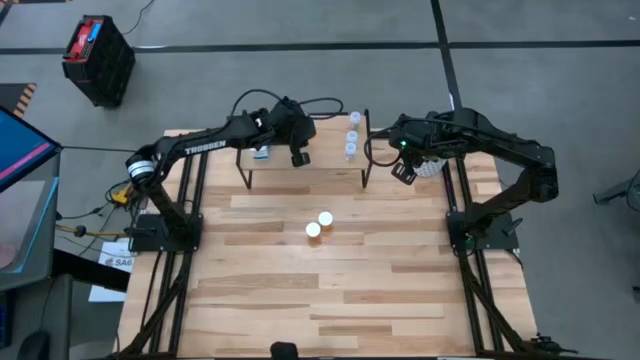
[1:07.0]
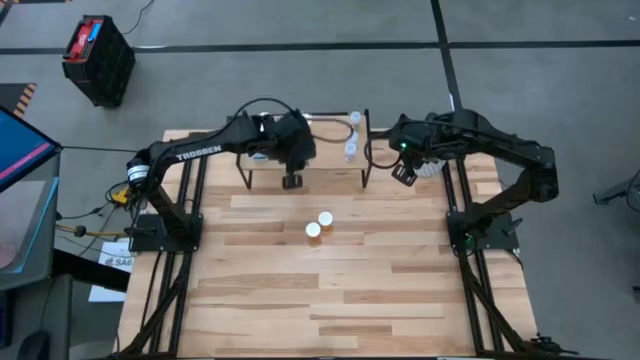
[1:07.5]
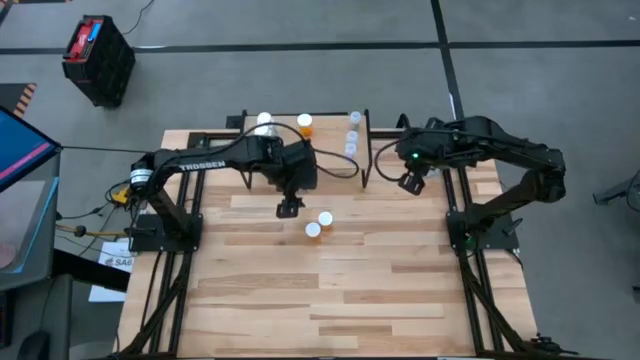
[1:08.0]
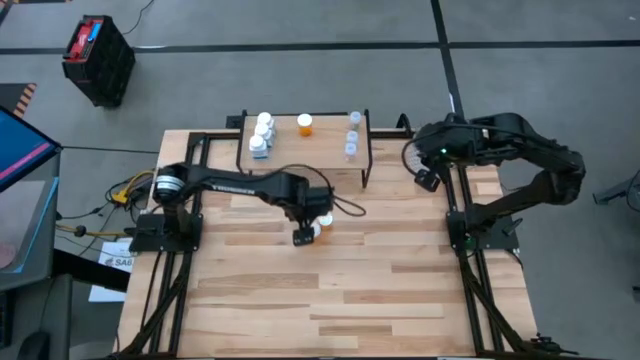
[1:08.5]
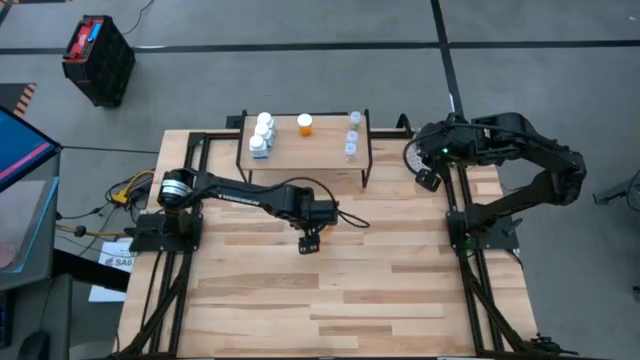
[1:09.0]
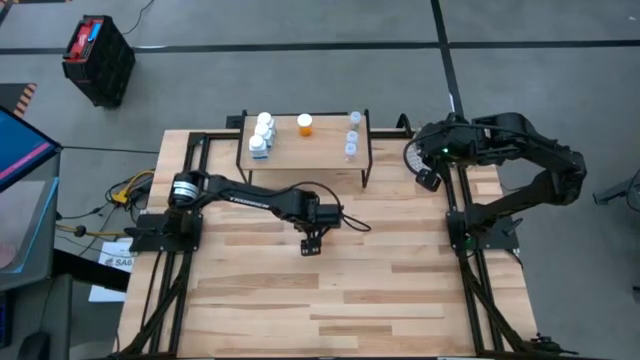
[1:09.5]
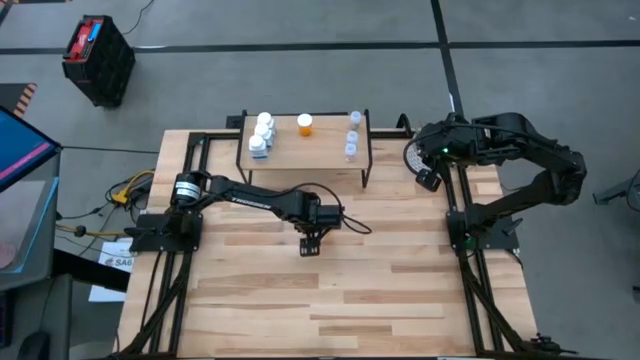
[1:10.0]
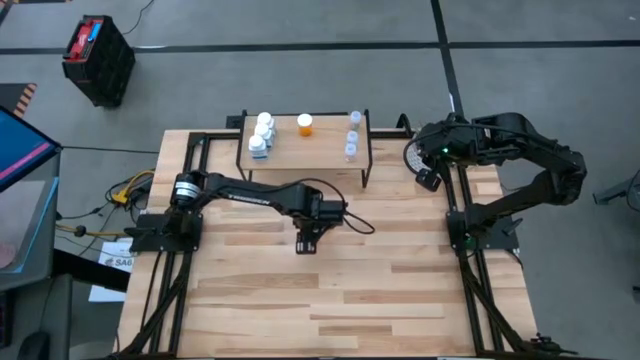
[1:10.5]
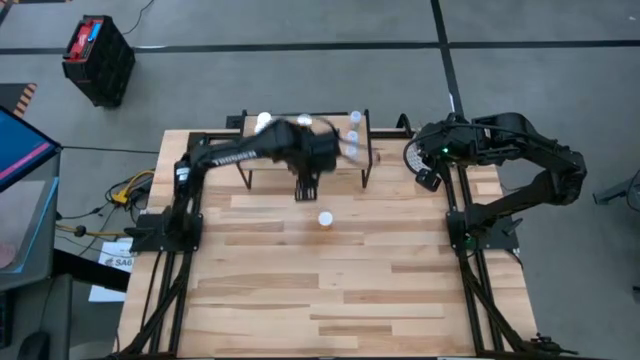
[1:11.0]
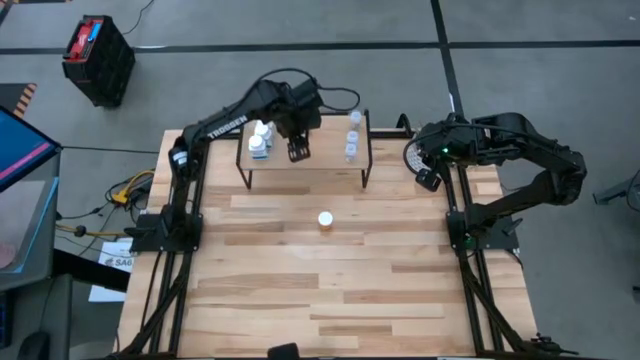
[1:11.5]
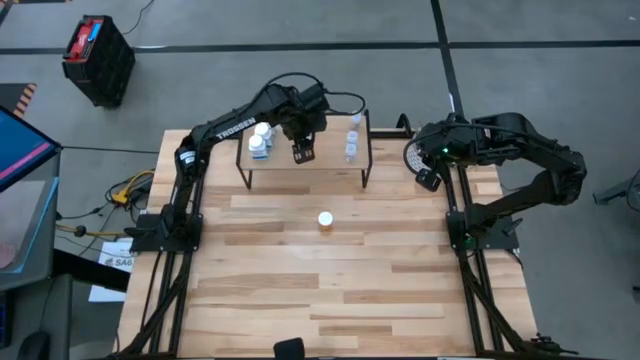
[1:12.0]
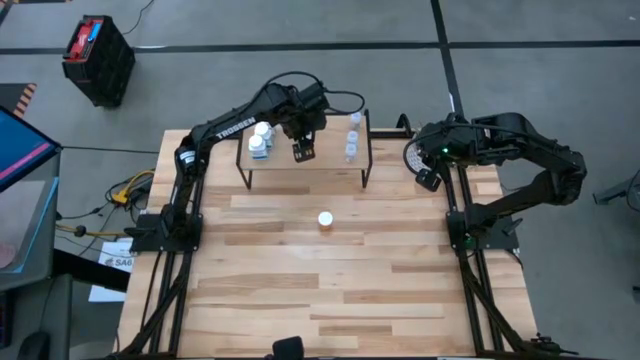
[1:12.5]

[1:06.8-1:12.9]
Task: Pick and place medicine bottles onto shelf by color
Put the bottom orange pill bottle on the shelf aligned with the other orange pill bottle

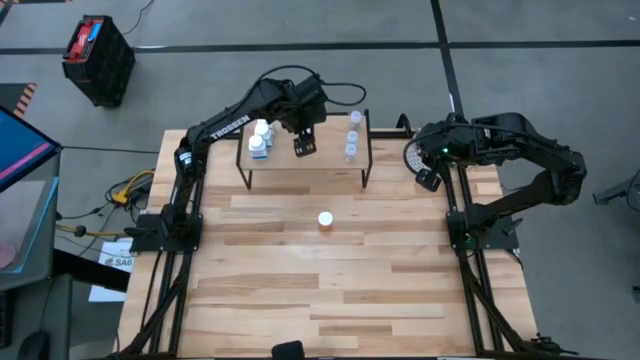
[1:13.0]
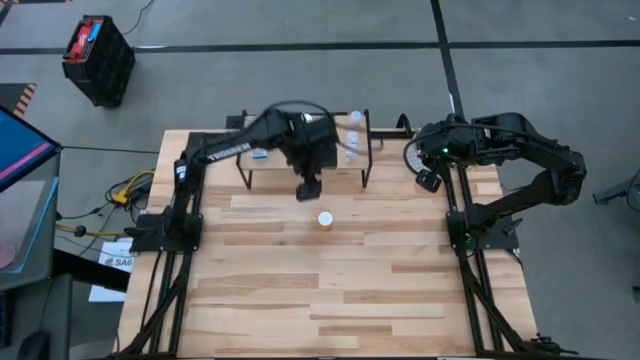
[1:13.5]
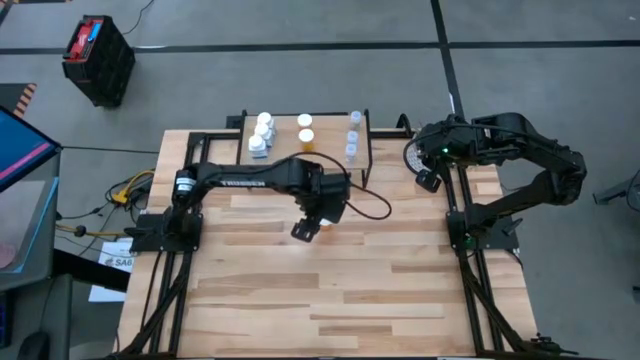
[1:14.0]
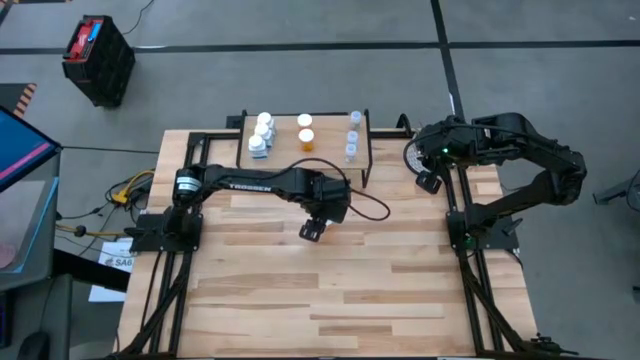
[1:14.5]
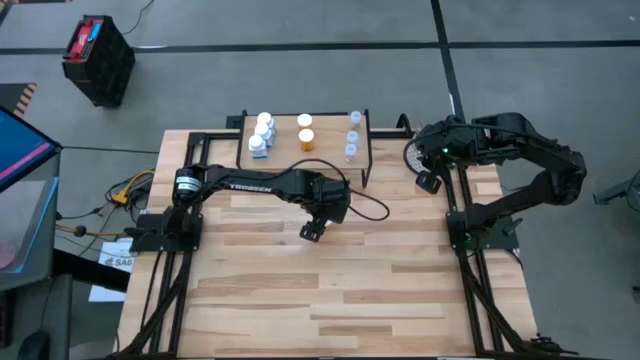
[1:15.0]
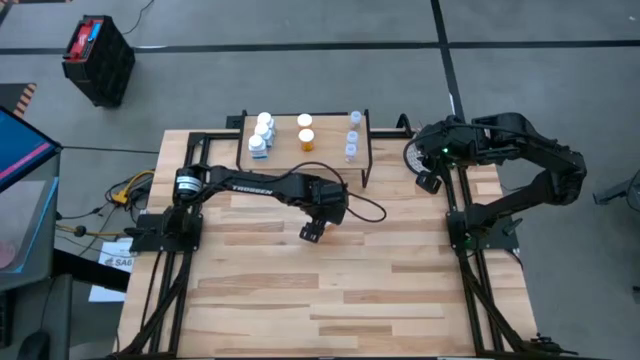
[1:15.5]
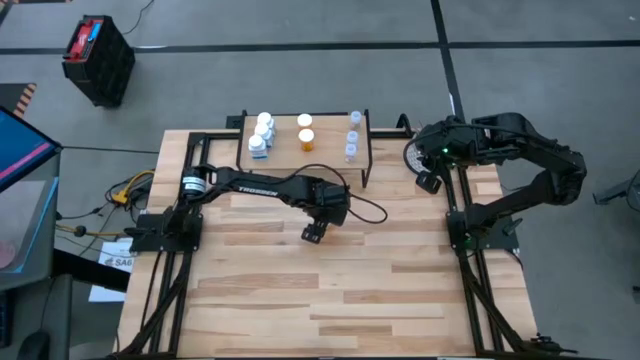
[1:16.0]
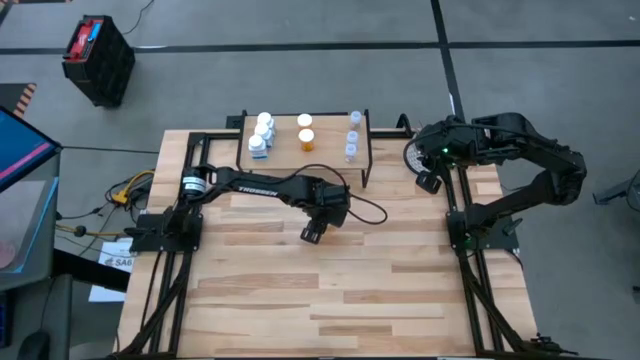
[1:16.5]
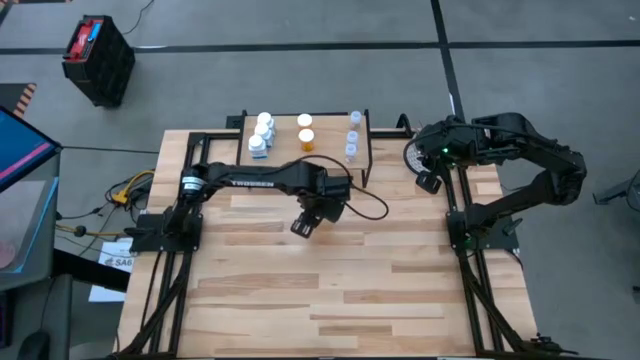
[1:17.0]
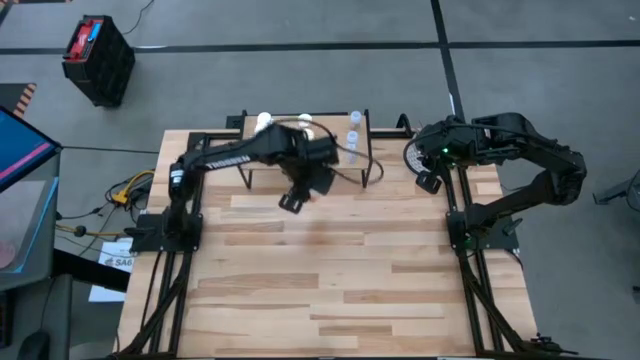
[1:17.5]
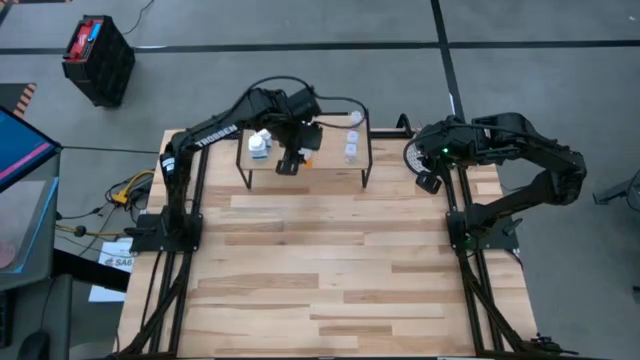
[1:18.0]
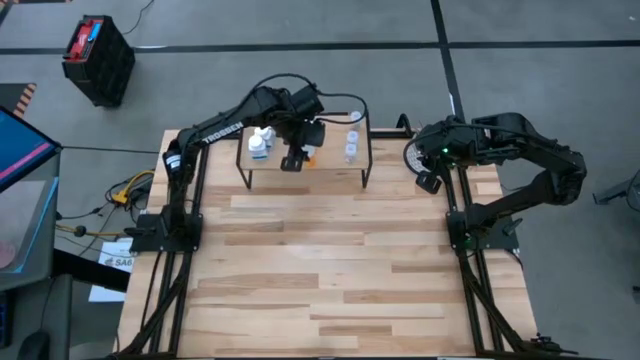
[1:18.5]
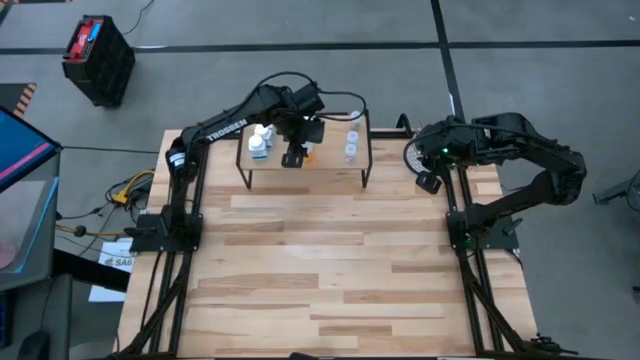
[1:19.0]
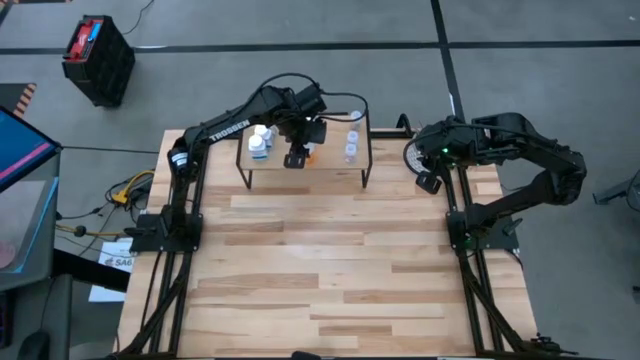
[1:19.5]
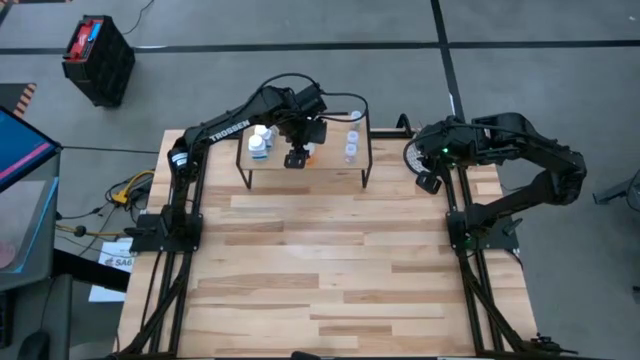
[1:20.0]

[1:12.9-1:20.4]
Put the orange pill bottle on the shelf aligned with the other orange pill bottles

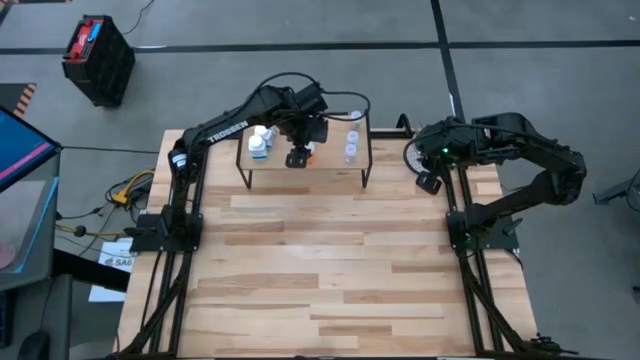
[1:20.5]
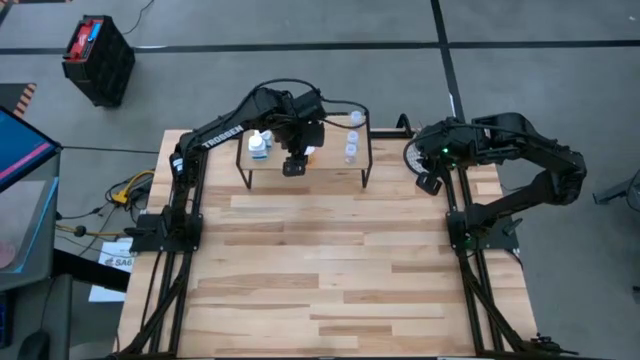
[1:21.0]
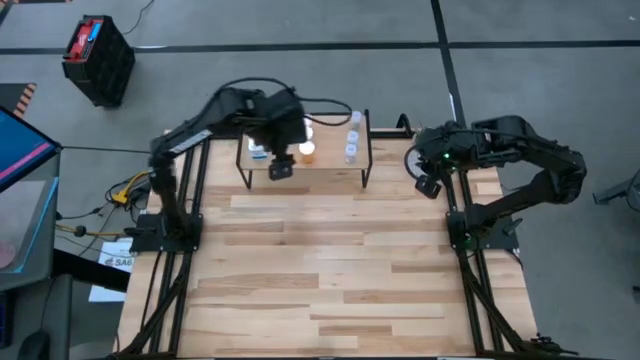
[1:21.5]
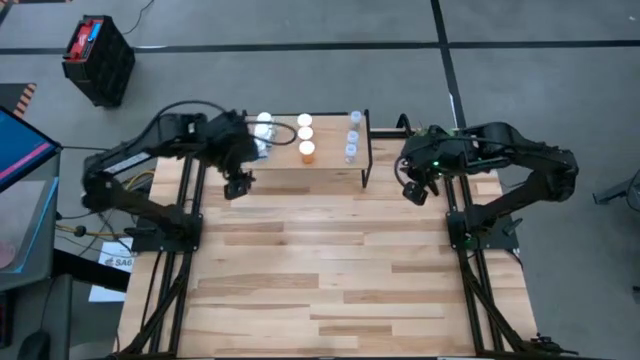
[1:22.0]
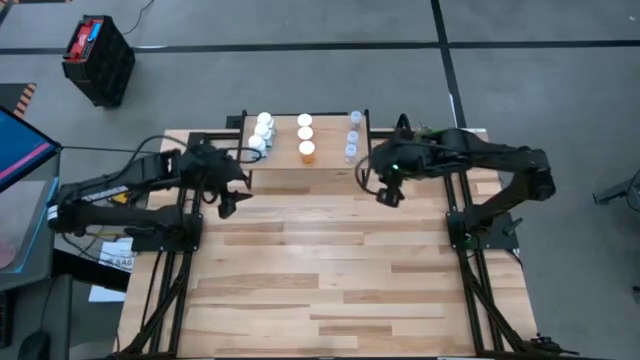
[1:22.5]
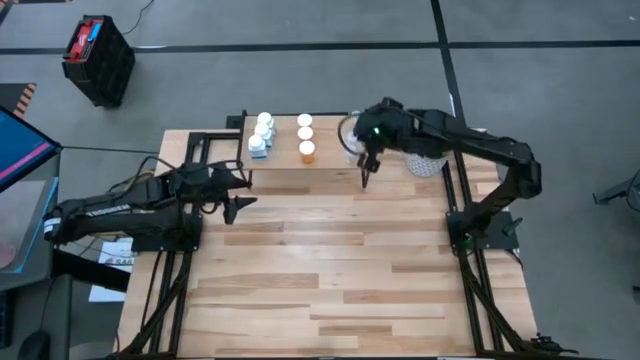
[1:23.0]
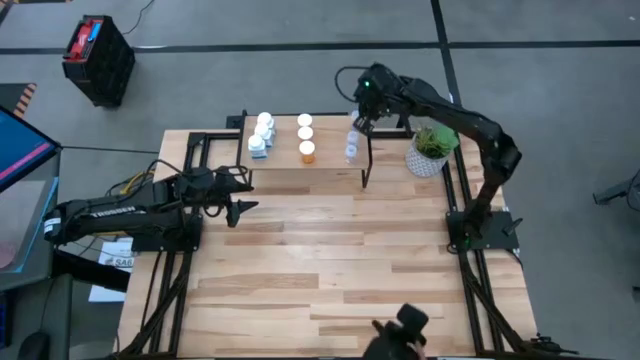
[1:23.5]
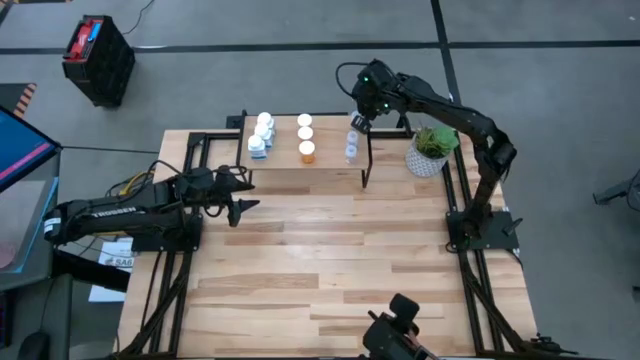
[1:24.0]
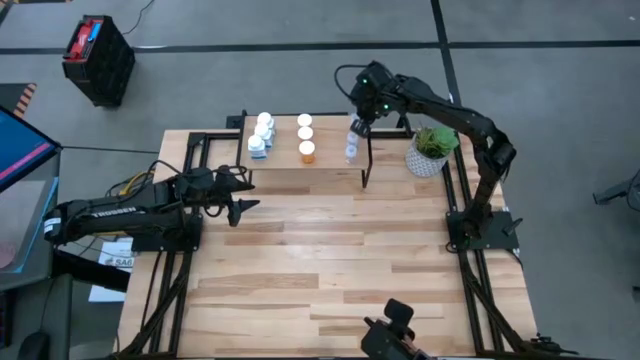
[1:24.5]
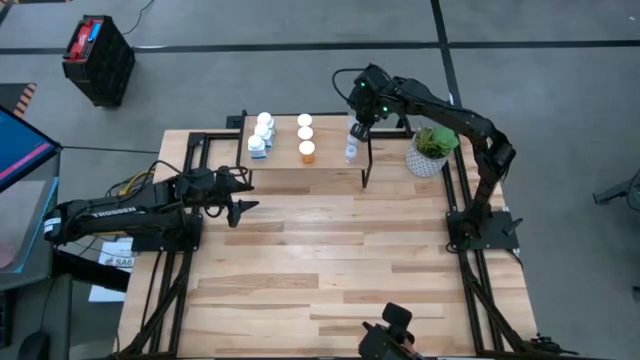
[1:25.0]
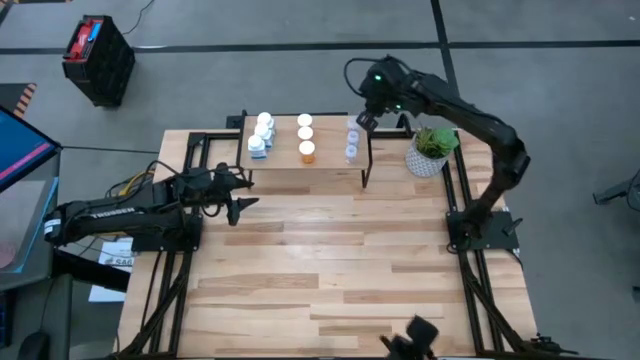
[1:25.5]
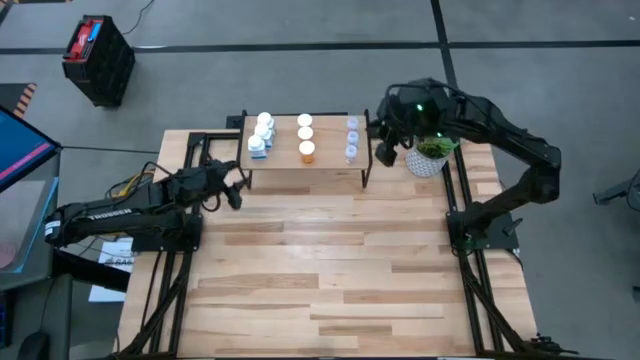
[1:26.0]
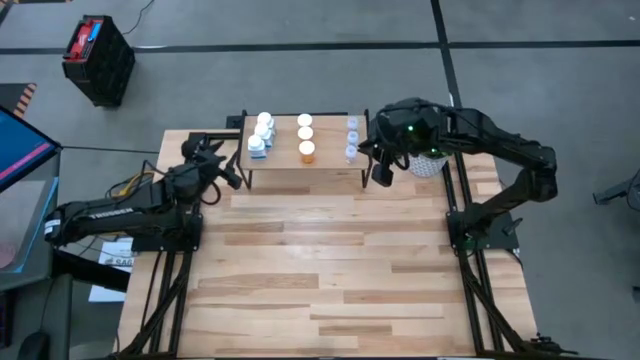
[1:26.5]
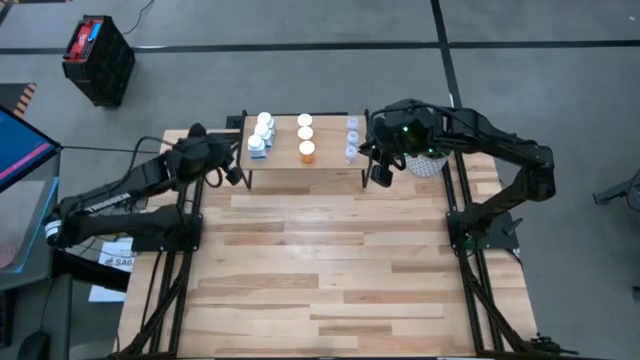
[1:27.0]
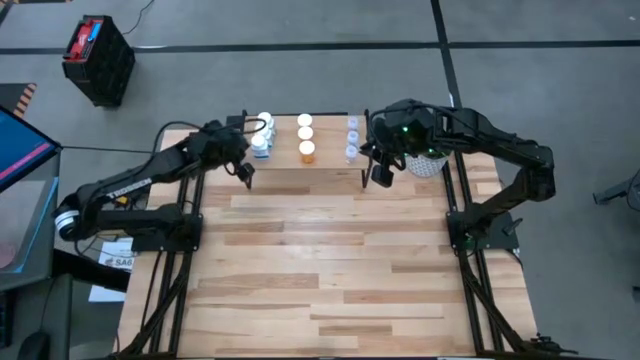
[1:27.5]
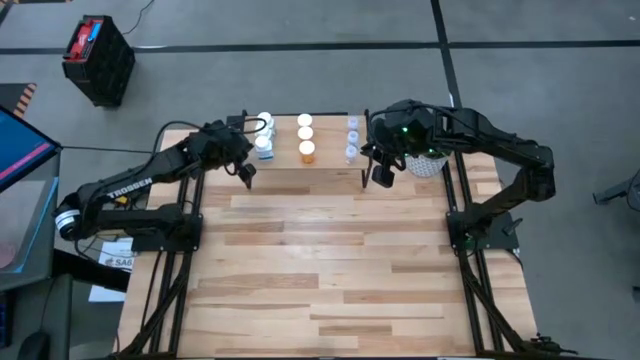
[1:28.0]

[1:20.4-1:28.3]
Adjust the pill bottles on the shelf

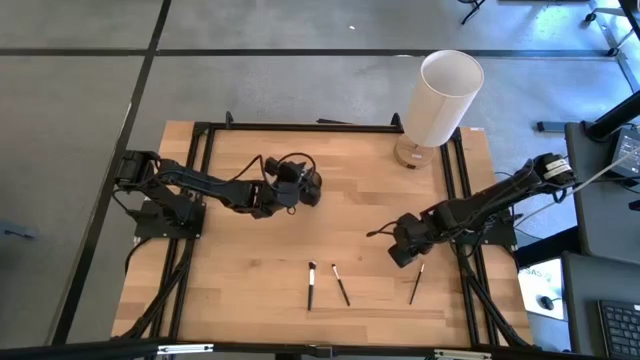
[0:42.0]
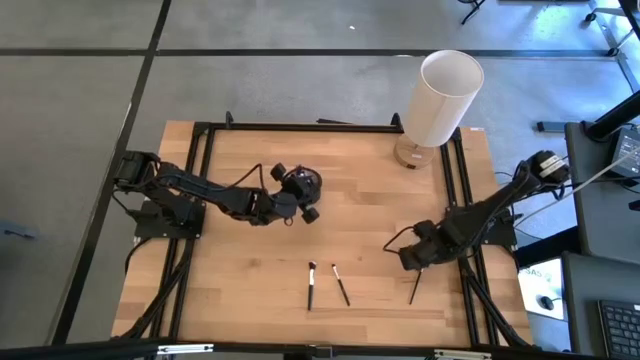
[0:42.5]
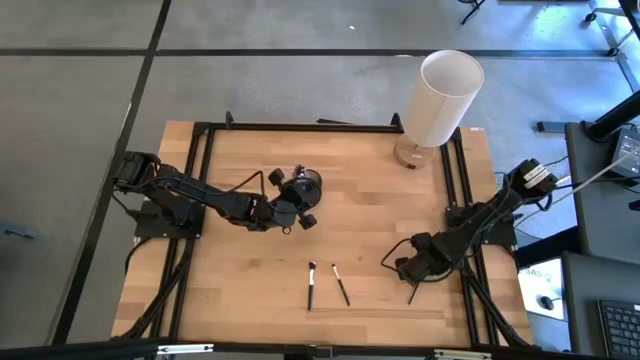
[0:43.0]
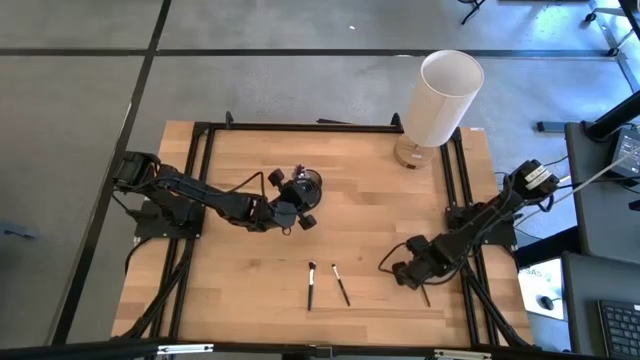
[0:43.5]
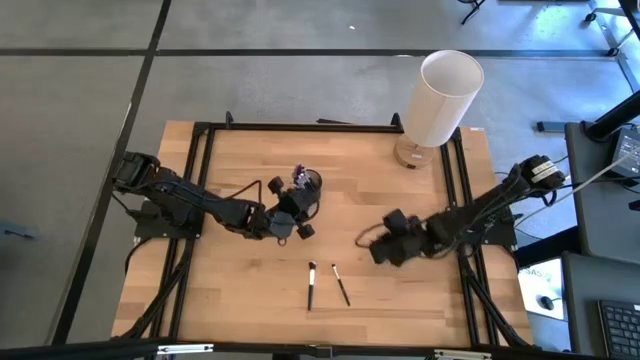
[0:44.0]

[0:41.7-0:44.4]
Task: Put items in baskets/containers
Put the black eyeshadow brush into the black pen holder
